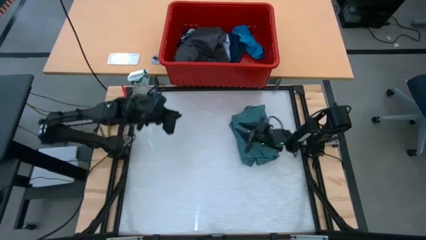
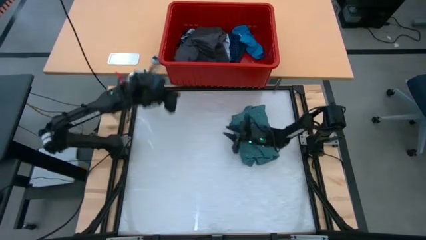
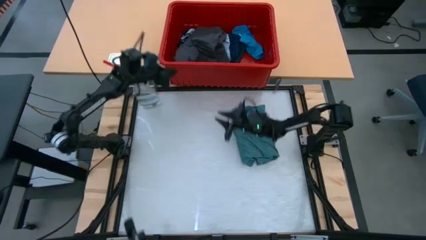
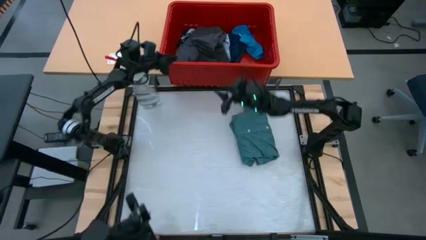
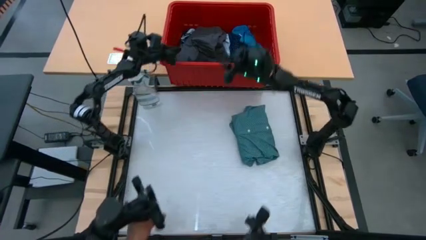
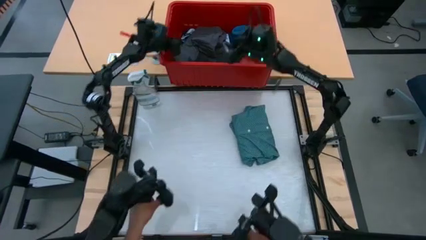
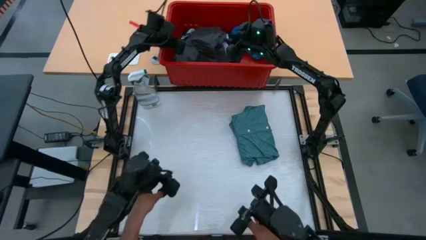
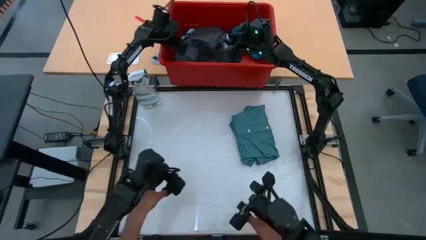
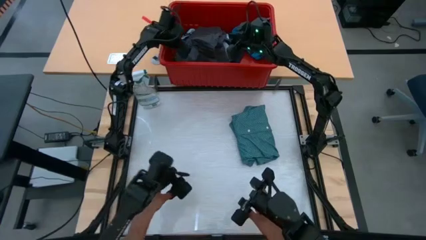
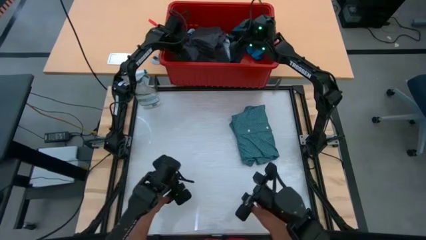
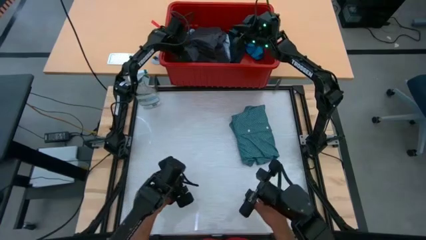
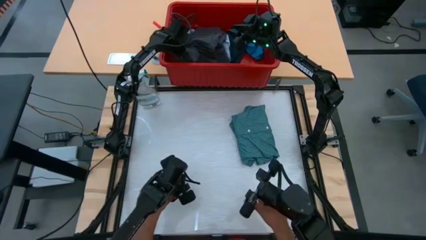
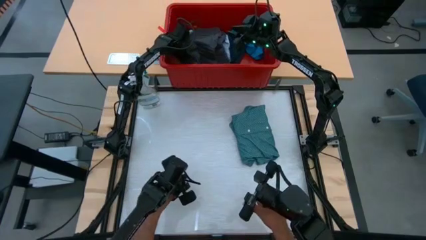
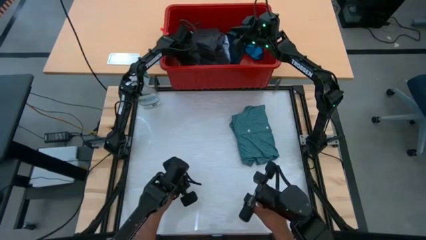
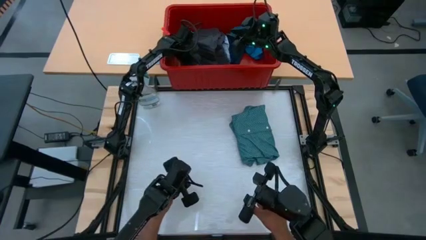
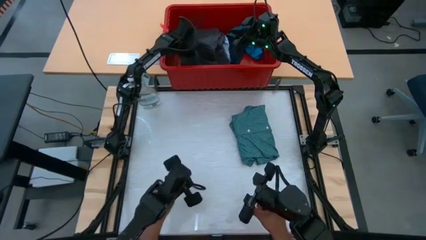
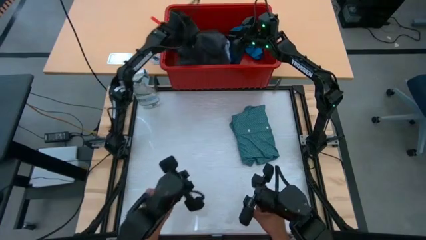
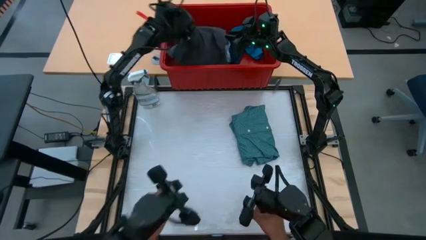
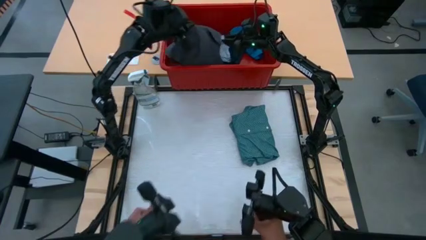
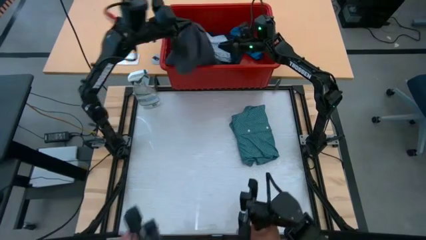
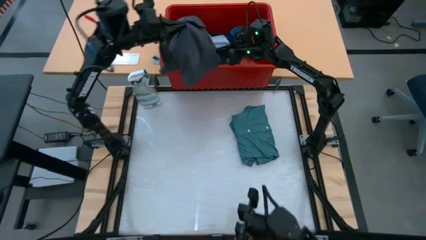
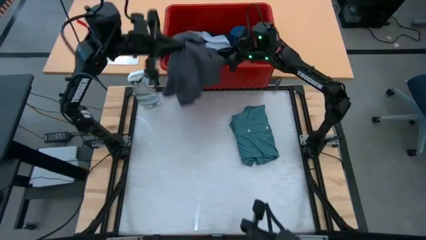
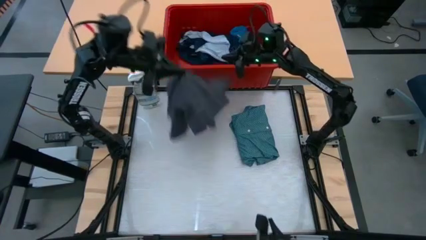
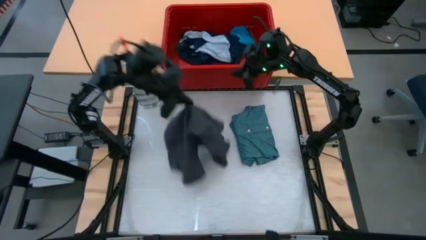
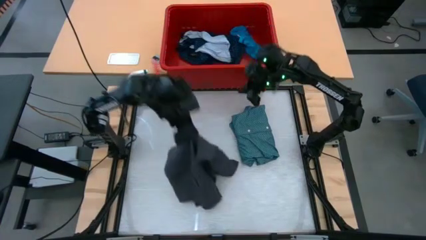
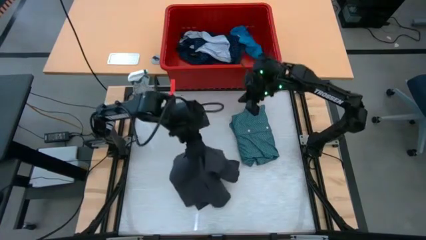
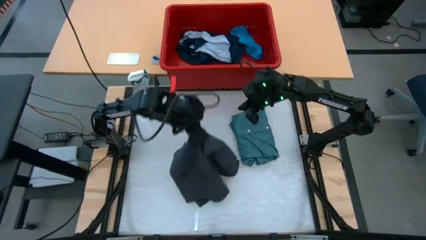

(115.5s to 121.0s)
Task: Fold laundry
Remove the gray shorts from the red bin

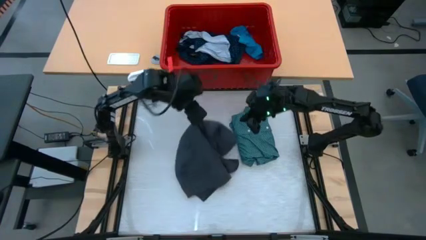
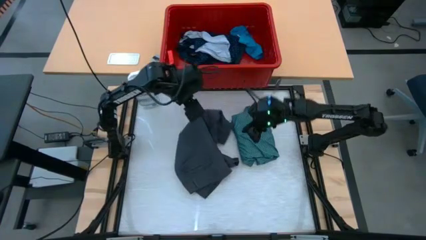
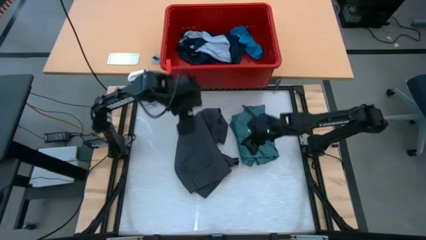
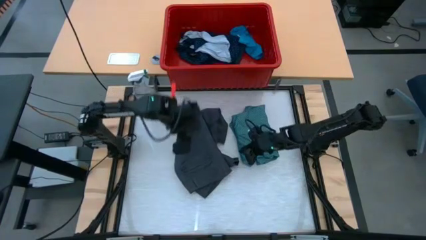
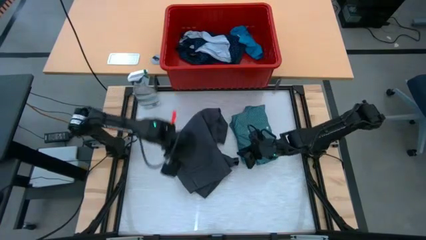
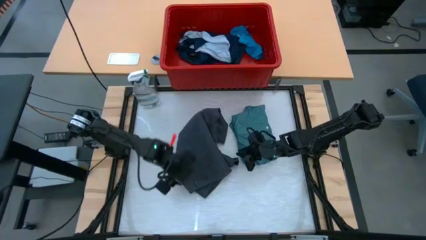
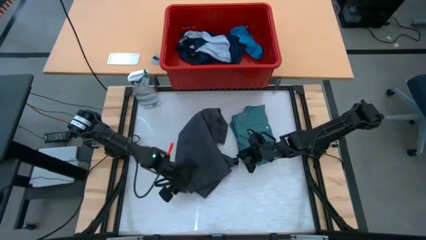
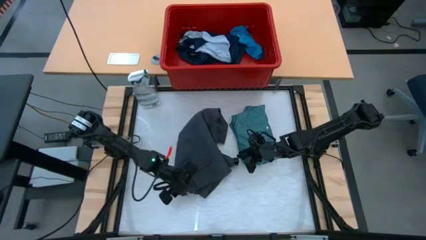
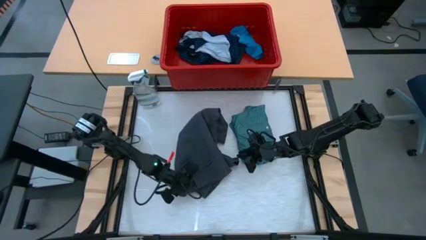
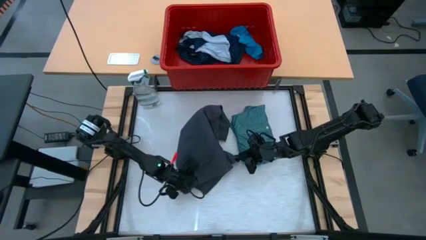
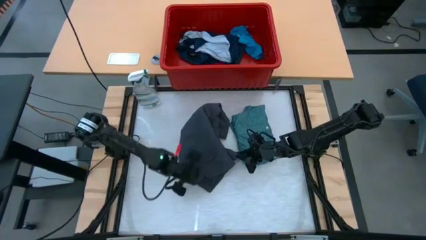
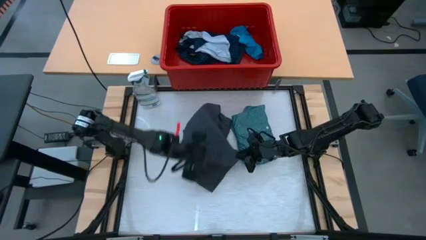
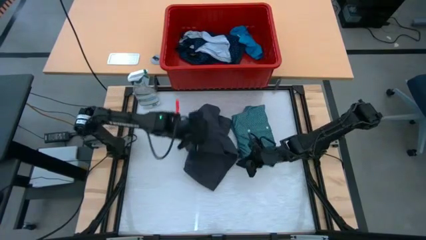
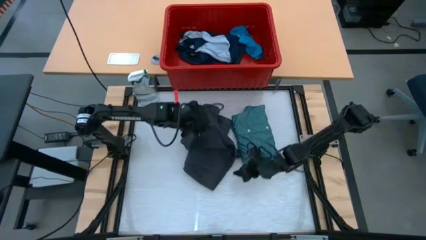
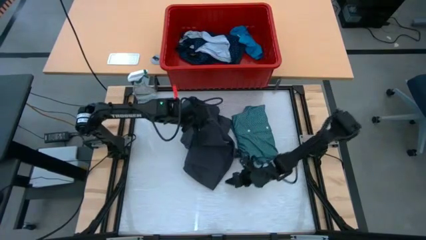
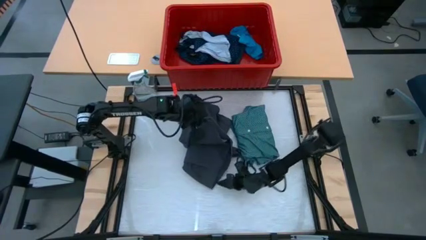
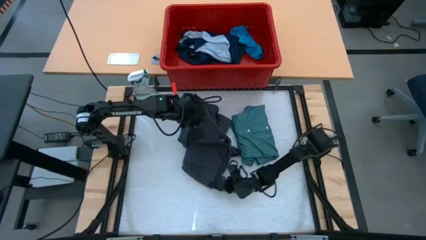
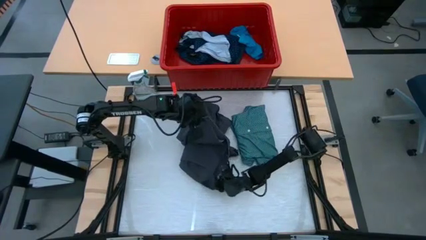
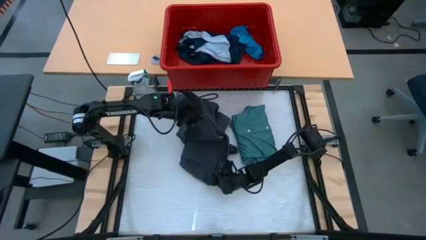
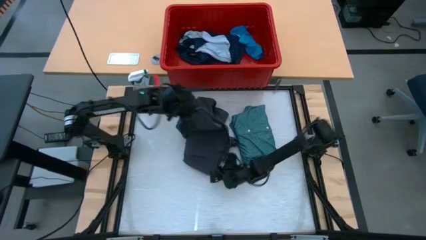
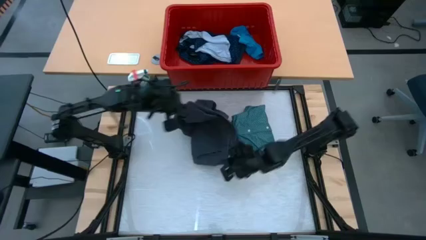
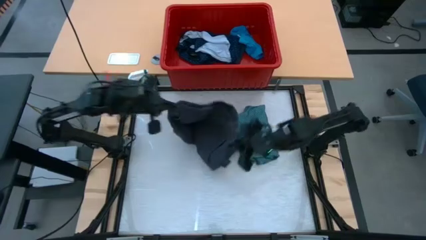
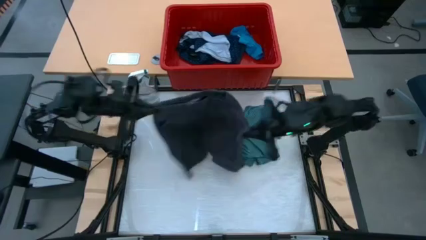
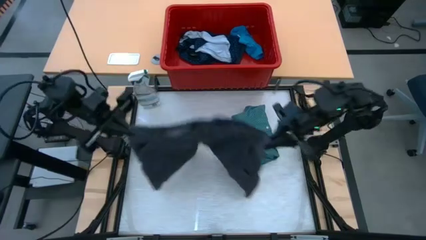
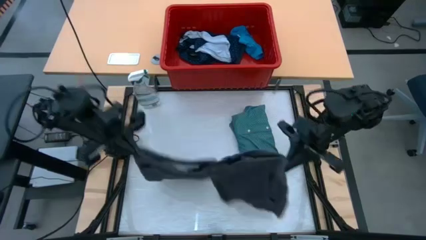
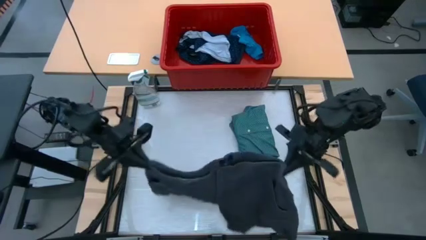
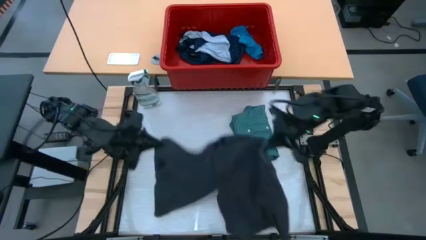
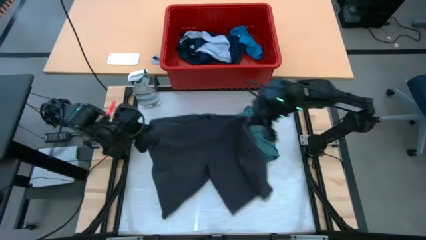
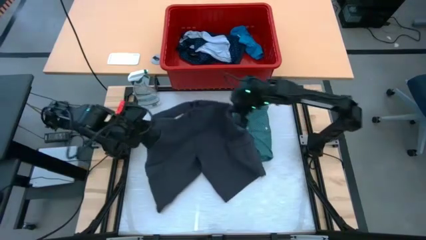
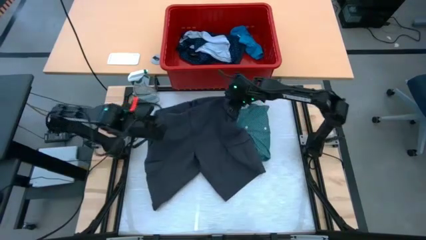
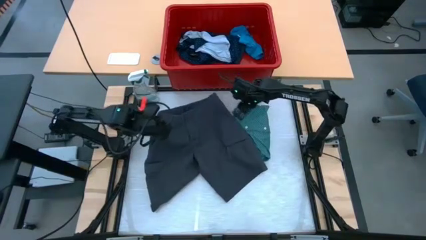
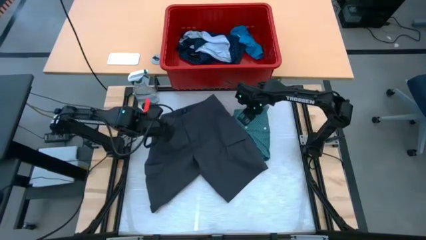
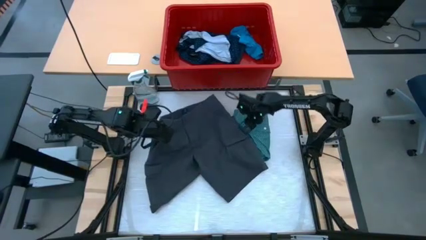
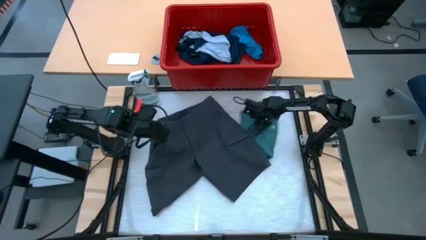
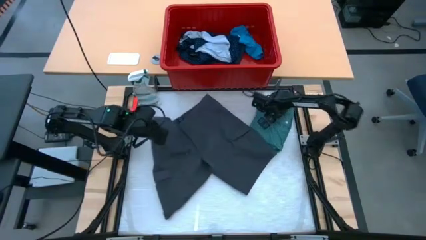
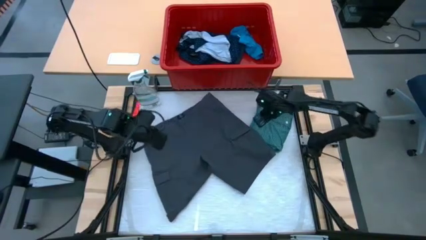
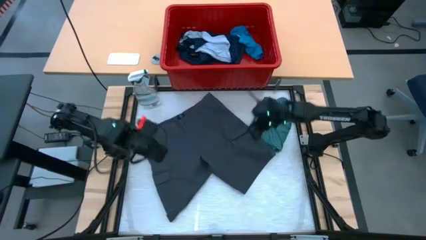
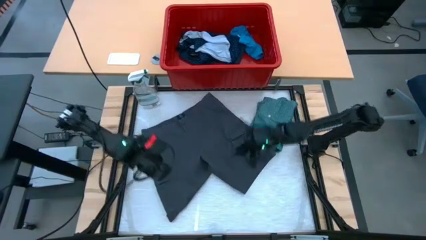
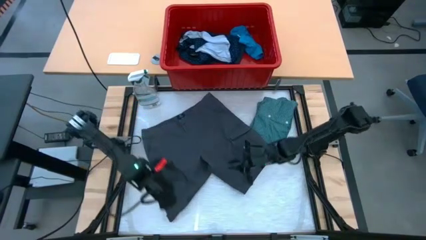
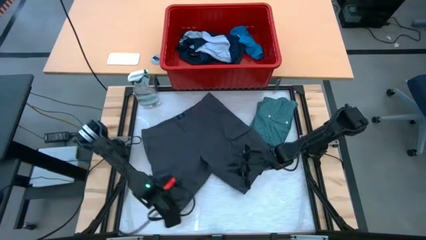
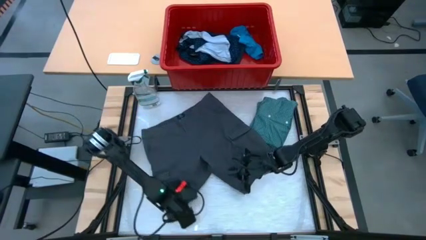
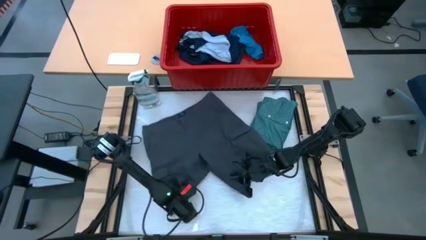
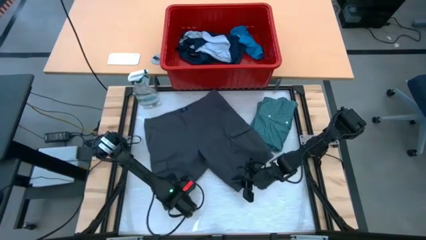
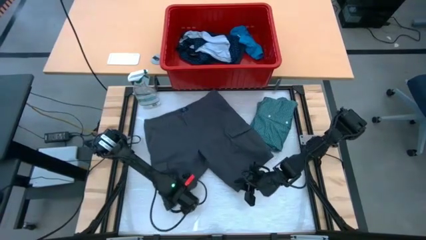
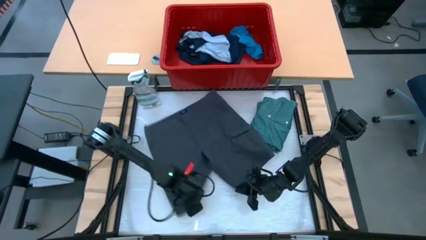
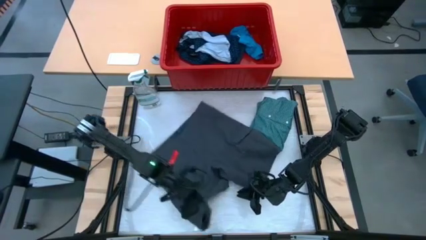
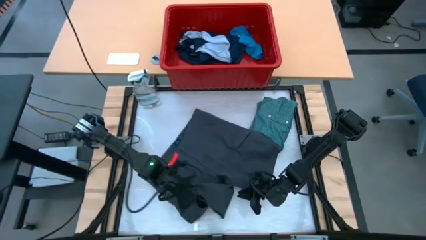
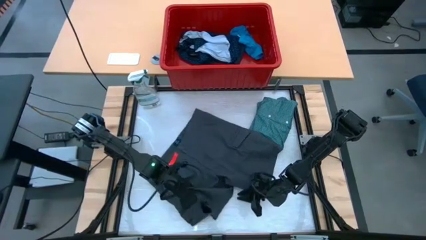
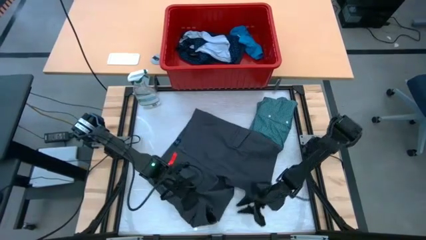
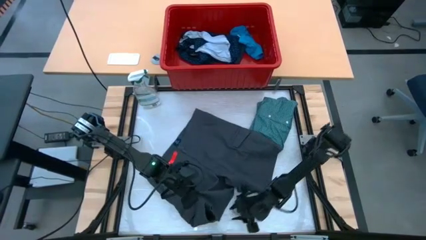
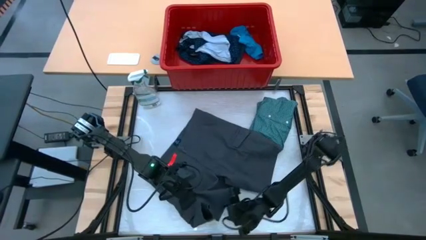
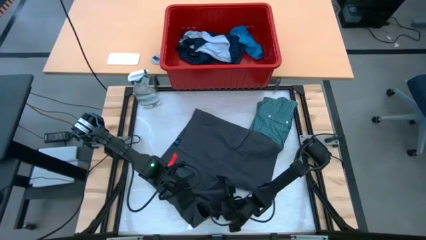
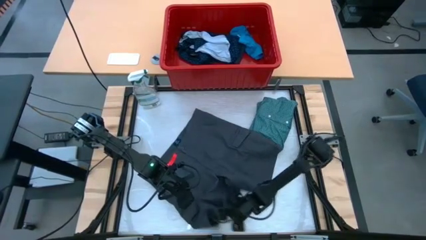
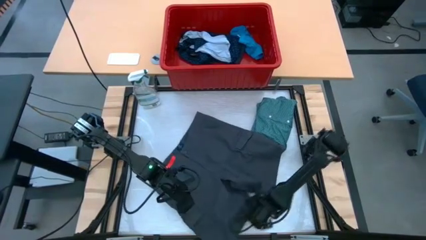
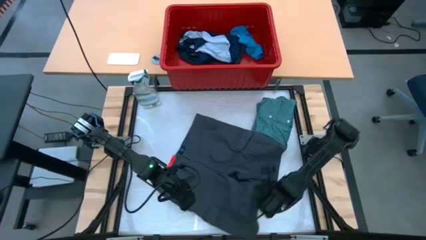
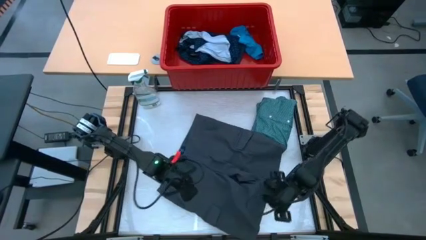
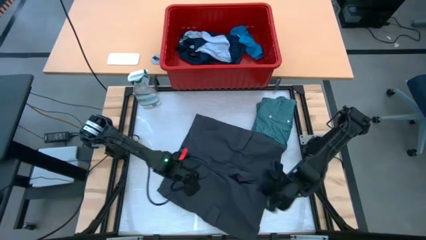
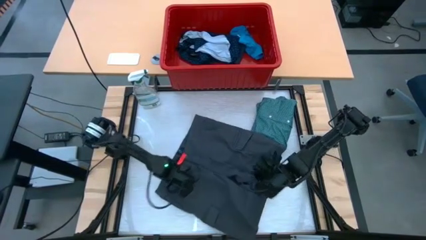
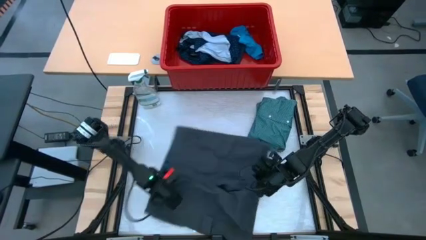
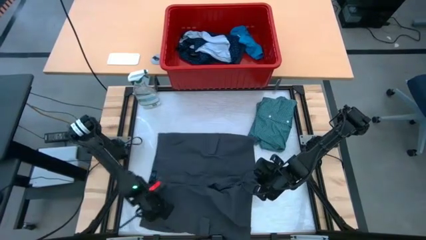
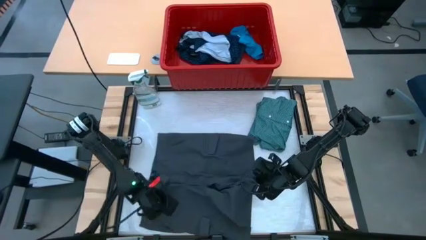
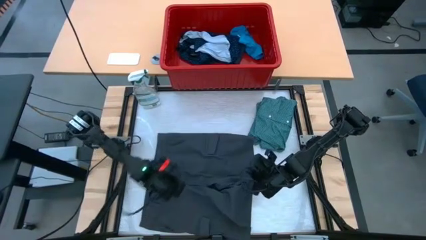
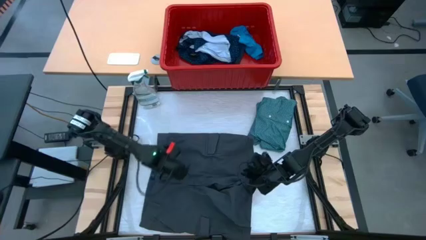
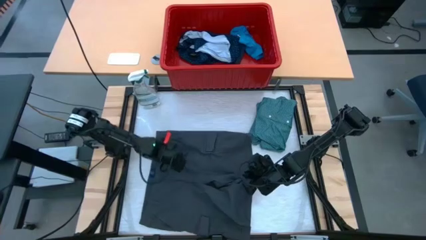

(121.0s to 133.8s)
Fold the gray shorts
